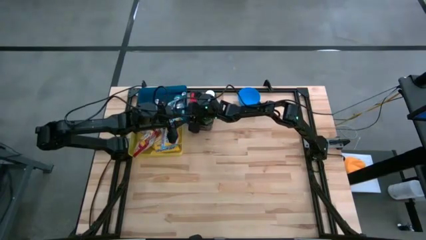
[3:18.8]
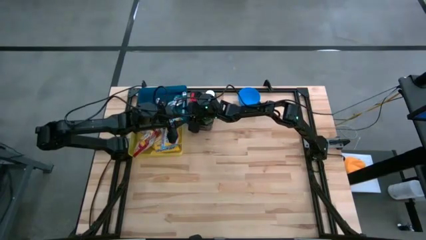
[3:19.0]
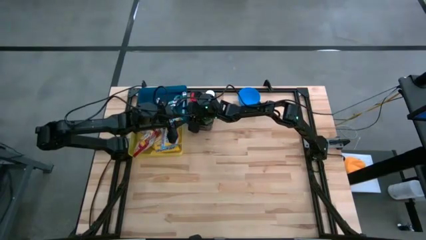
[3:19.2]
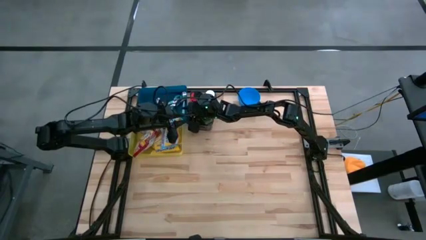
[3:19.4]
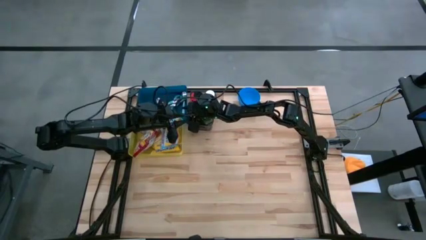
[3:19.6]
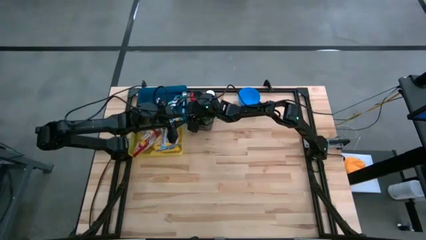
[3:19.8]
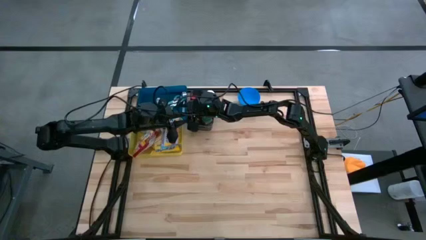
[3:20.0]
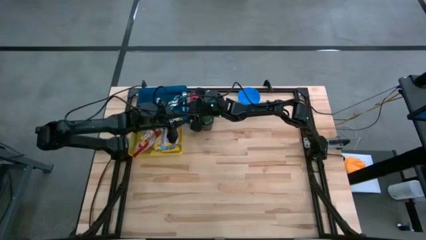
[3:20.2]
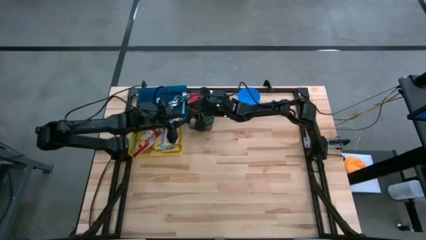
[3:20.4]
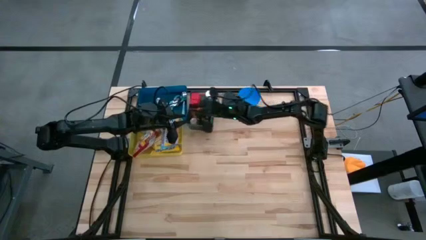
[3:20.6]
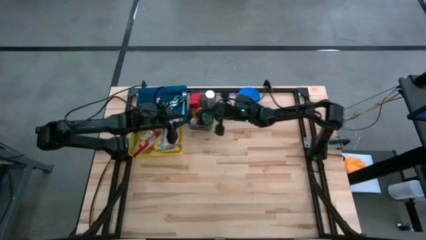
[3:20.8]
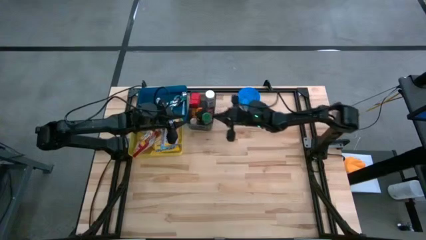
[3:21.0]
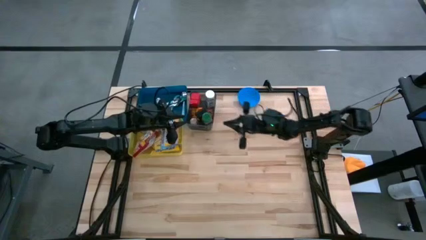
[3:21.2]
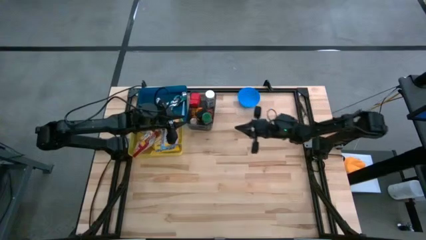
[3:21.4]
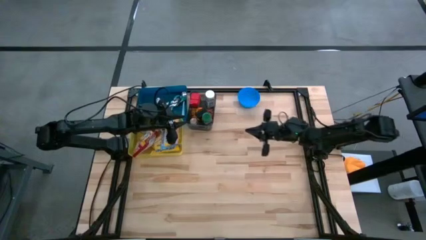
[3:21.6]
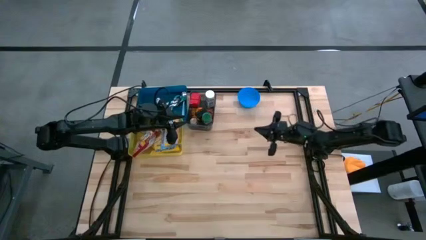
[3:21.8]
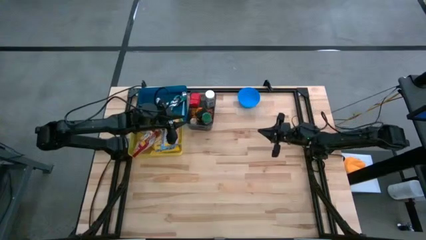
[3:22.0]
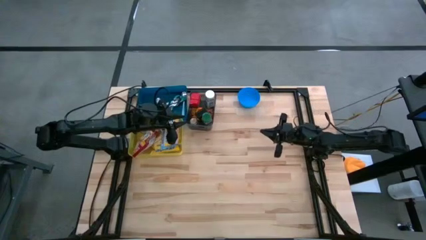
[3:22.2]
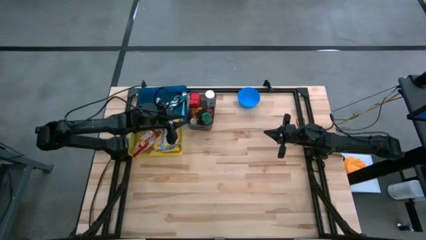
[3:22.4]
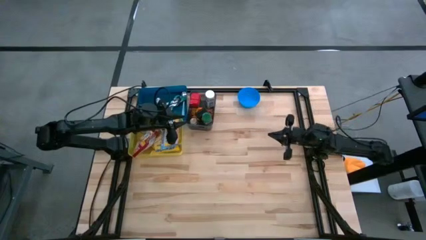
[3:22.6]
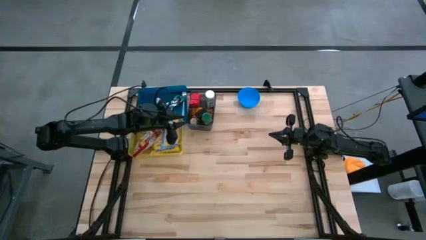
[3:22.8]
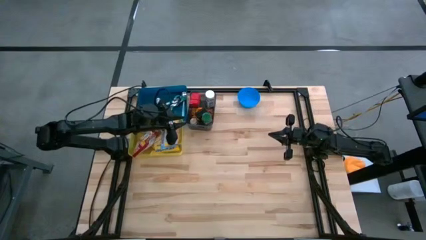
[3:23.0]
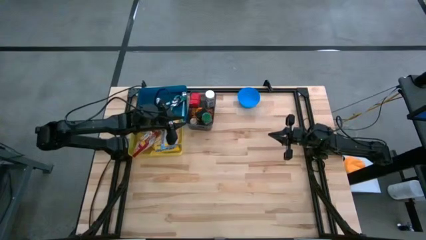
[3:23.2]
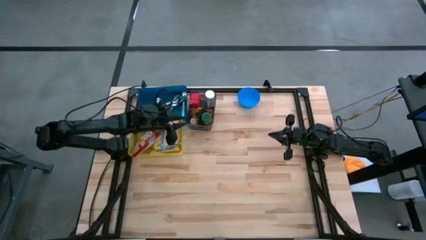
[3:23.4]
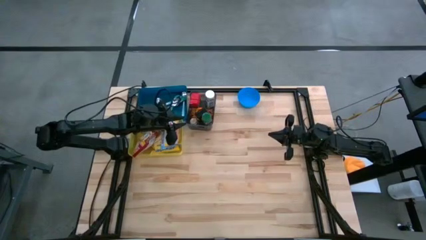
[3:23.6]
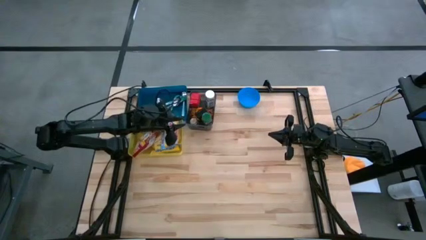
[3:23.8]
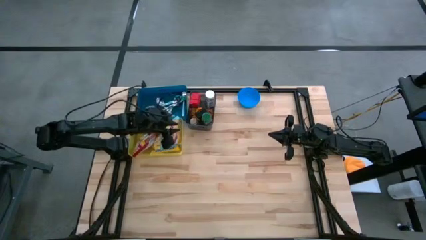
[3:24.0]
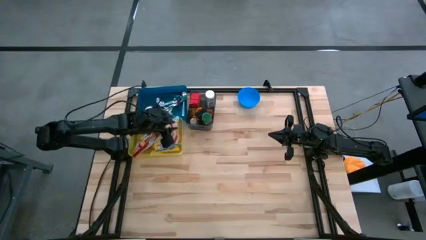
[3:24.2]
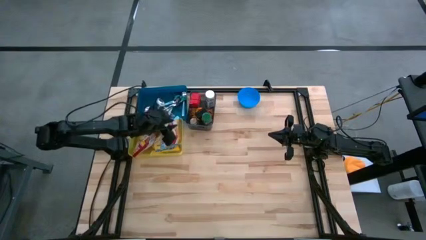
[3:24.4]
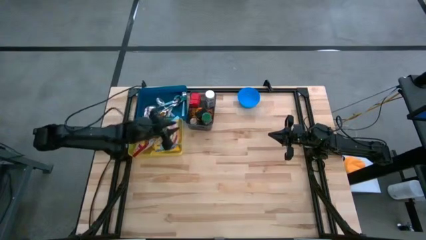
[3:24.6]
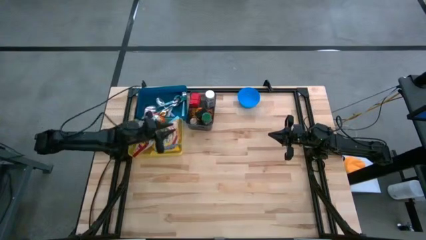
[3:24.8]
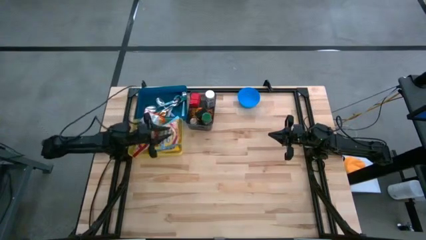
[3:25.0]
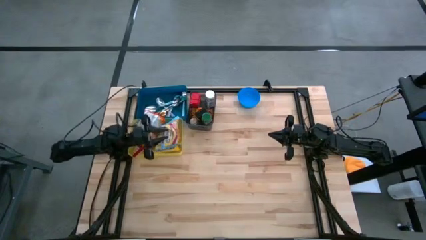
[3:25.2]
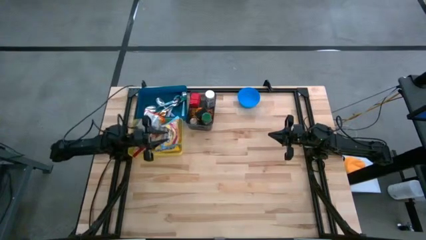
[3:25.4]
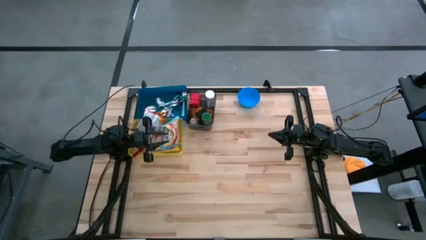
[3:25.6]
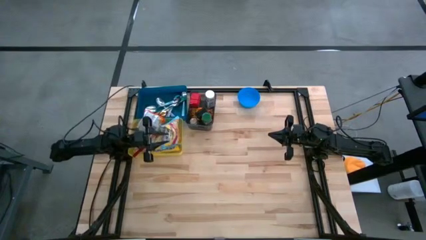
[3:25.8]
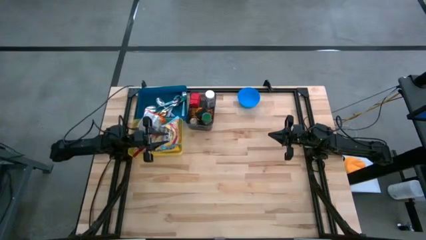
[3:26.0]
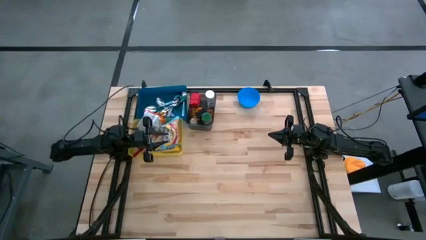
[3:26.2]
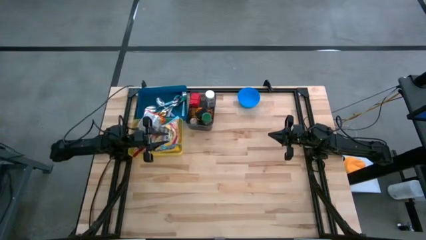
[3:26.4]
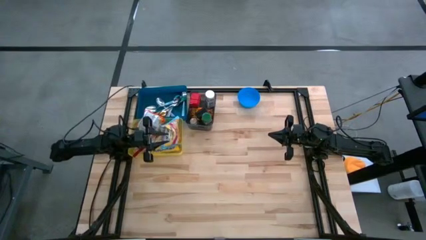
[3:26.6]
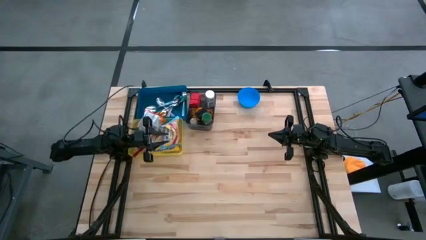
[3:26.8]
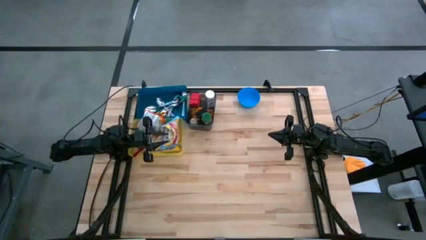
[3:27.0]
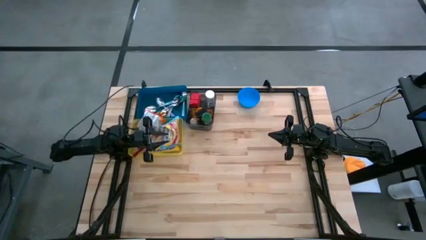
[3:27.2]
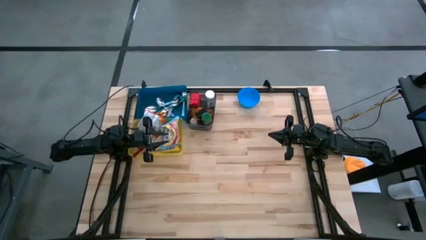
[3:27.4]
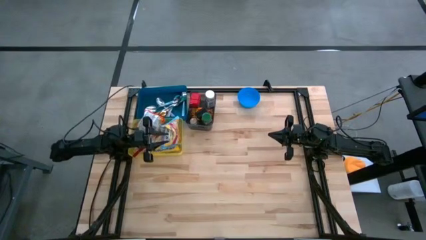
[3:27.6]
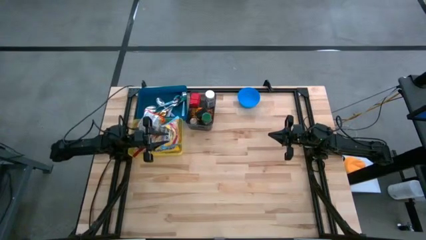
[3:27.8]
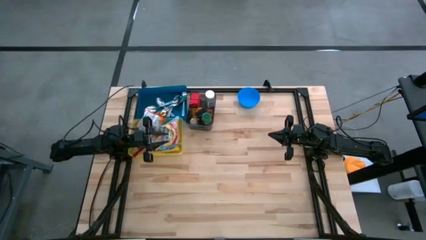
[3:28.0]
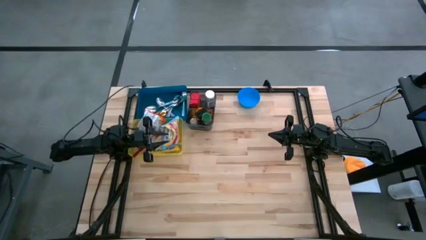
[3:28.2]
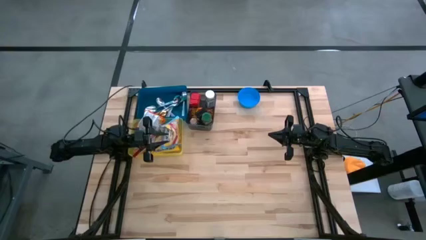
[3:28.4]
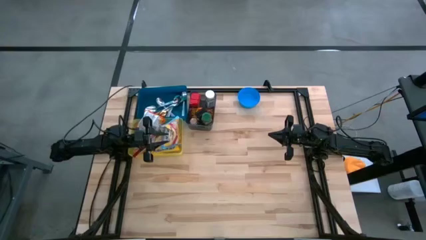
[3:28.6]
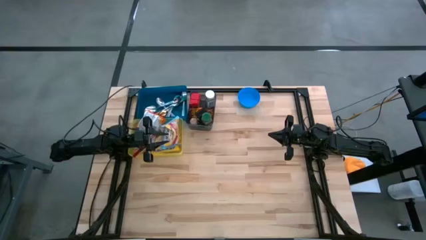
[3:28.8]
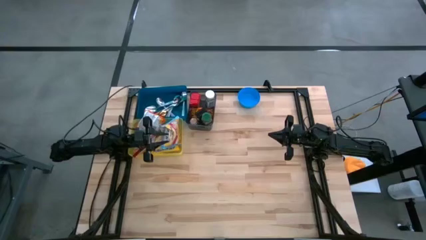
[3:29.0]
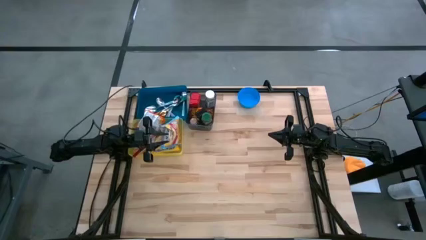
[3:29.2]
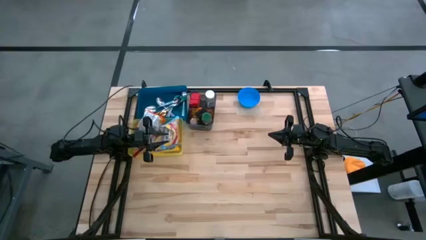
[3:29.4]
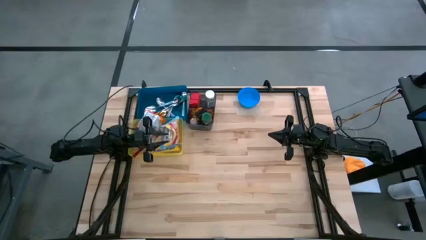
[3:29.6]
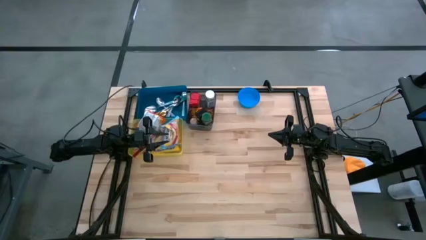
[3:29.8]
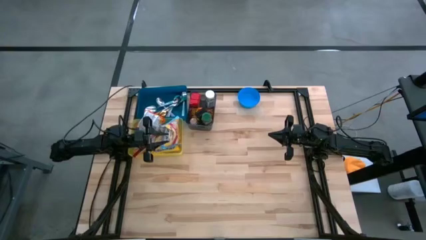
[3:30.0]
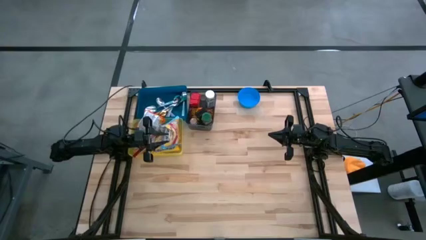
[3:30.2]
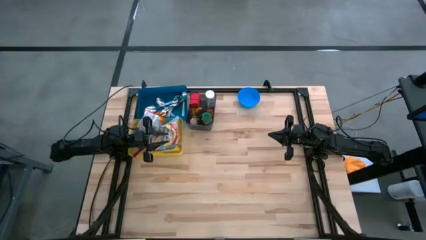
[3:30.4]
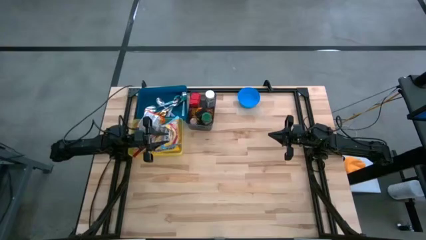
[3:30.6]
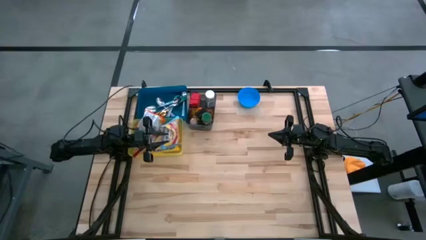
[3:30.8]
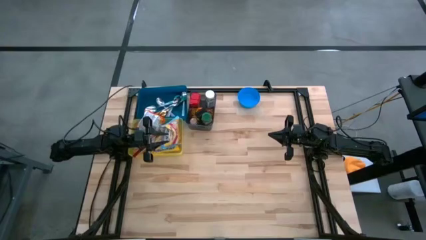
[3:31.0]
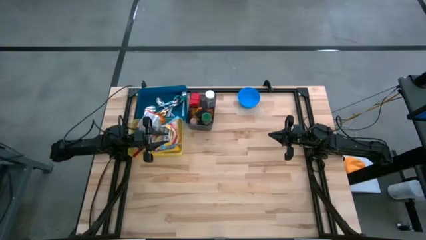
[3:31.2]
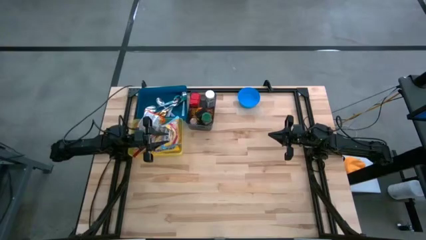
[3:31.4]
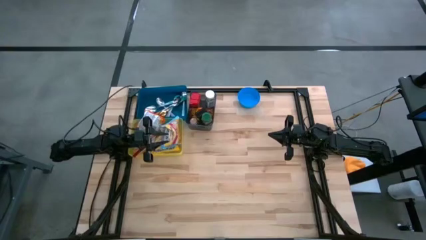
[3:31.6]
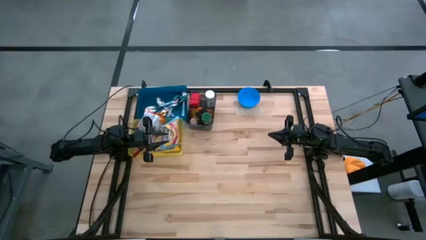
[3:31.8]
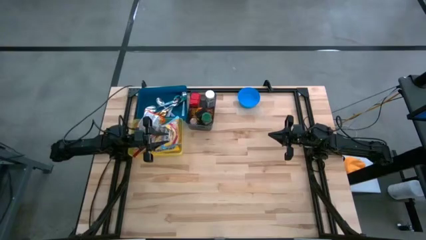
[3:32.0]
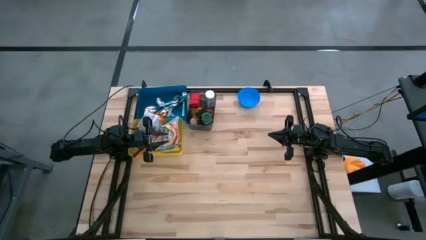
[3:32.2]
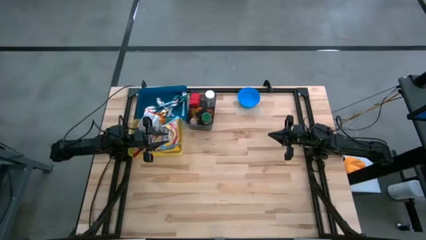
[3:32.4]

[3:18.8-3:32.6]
Return to Home Position
